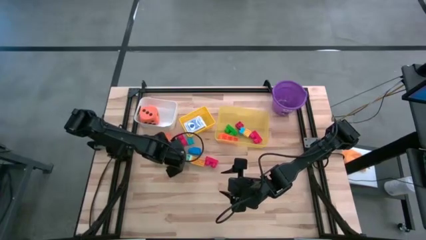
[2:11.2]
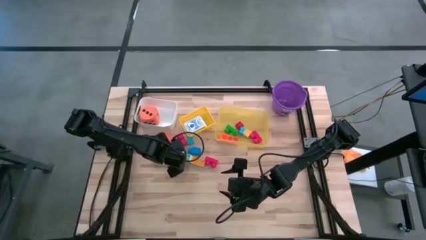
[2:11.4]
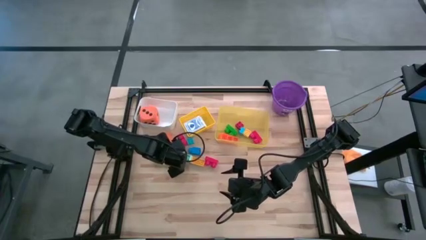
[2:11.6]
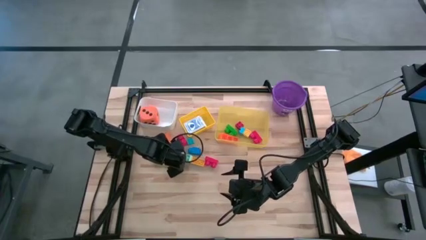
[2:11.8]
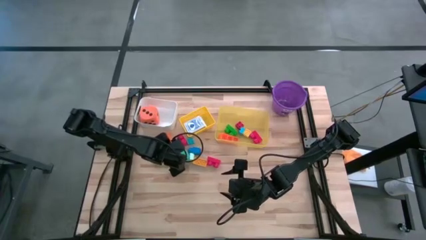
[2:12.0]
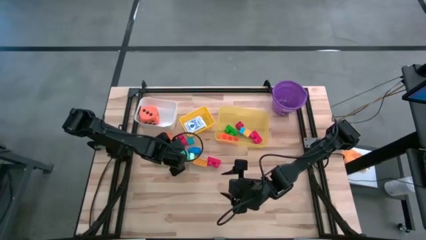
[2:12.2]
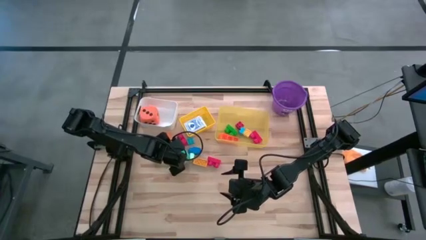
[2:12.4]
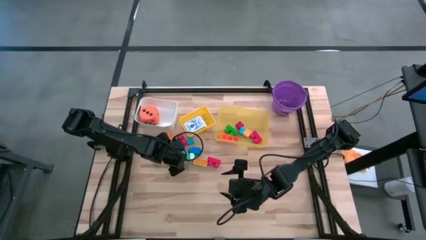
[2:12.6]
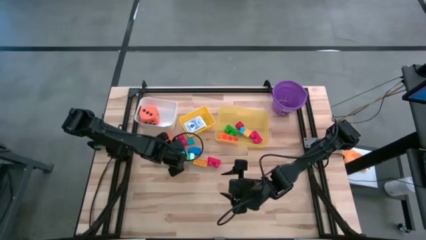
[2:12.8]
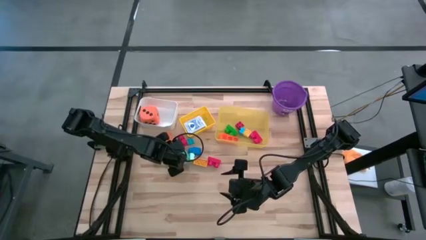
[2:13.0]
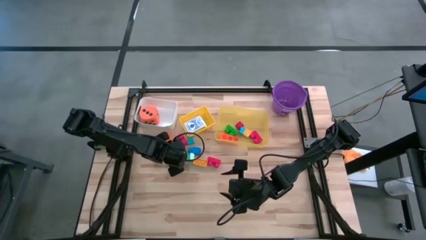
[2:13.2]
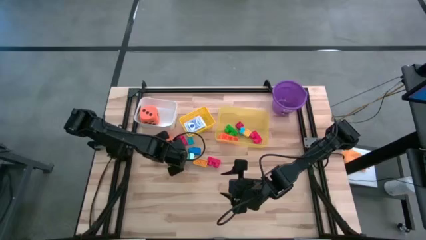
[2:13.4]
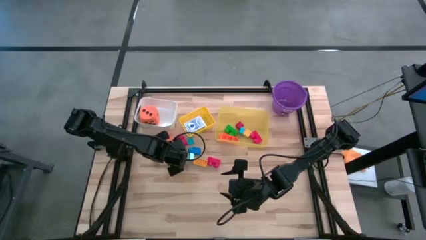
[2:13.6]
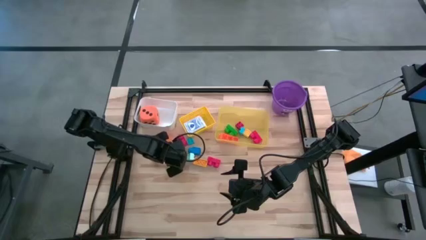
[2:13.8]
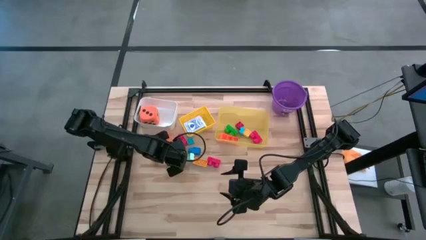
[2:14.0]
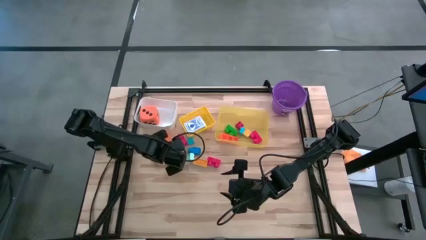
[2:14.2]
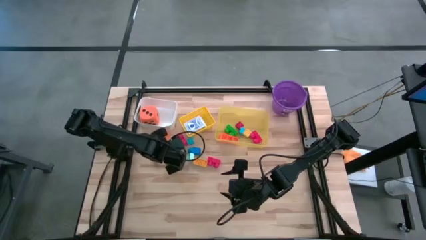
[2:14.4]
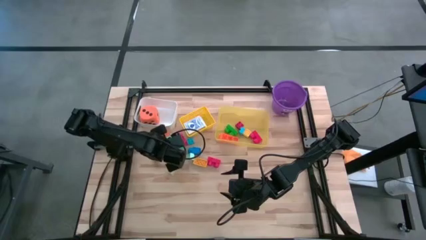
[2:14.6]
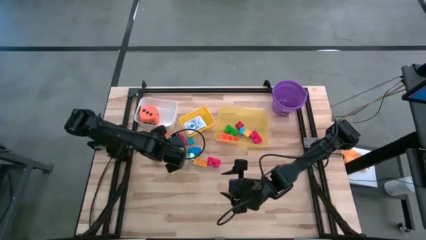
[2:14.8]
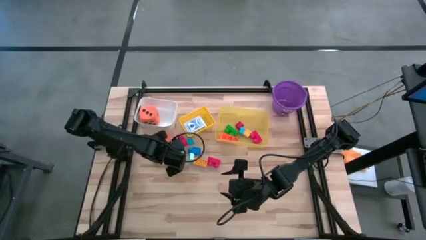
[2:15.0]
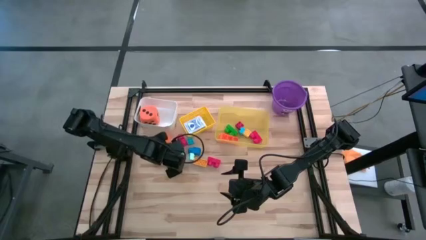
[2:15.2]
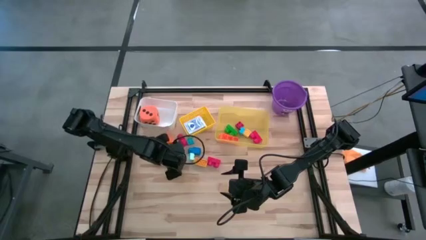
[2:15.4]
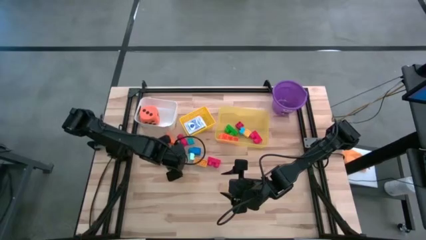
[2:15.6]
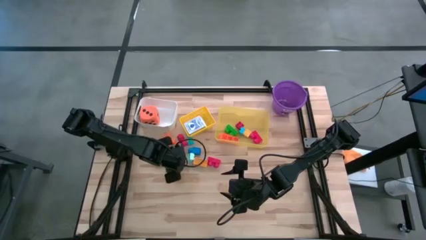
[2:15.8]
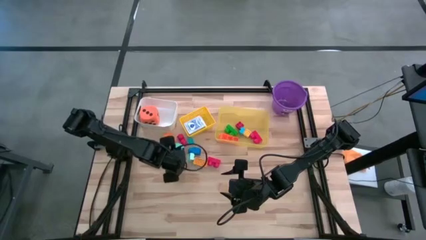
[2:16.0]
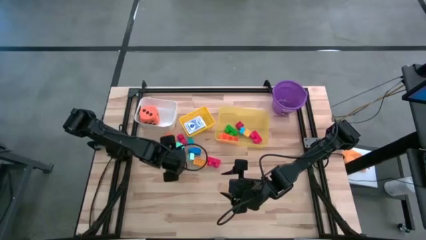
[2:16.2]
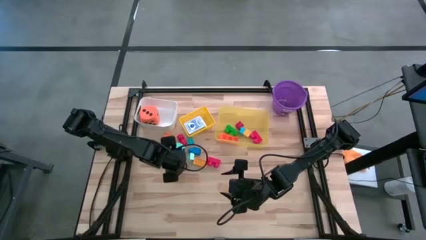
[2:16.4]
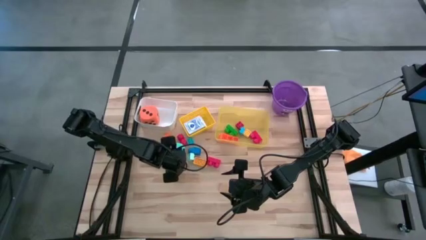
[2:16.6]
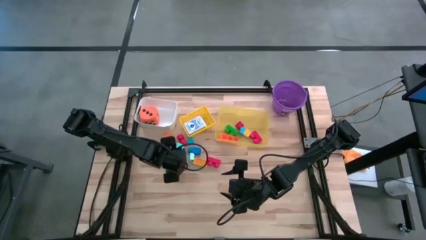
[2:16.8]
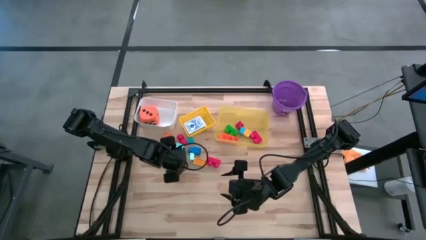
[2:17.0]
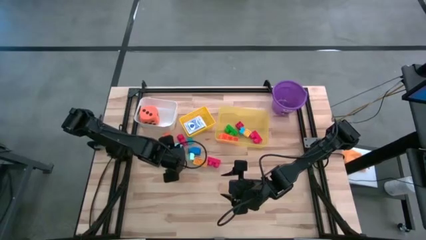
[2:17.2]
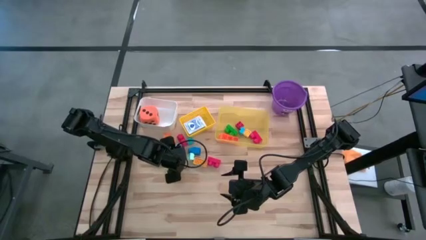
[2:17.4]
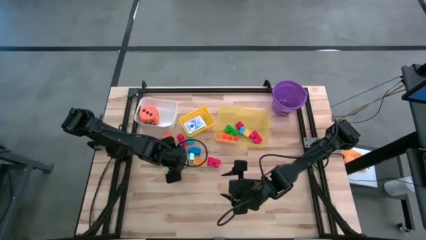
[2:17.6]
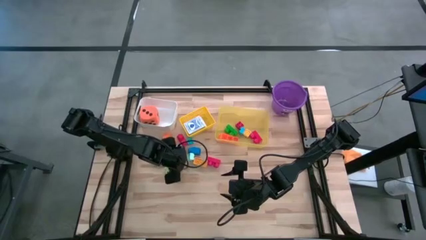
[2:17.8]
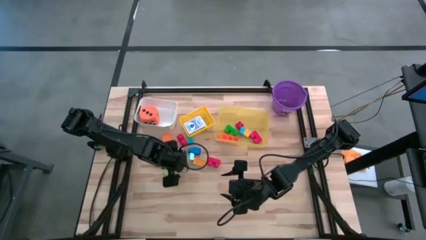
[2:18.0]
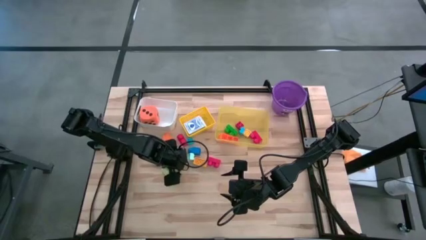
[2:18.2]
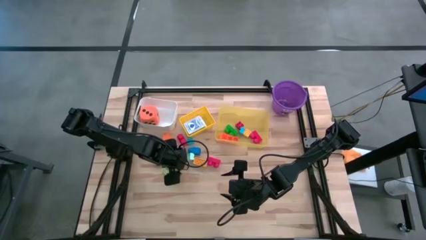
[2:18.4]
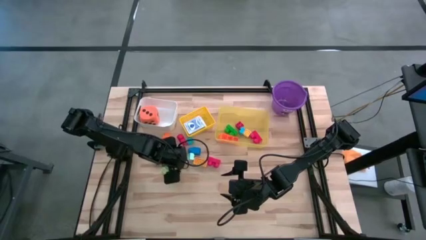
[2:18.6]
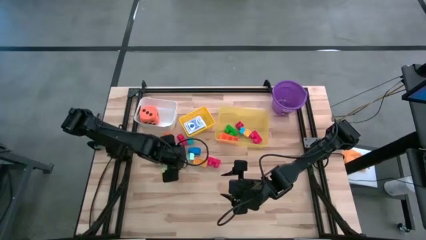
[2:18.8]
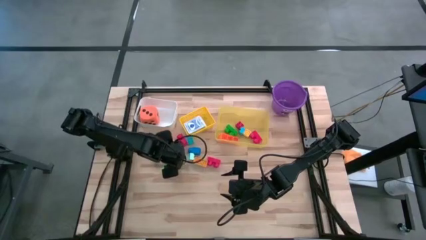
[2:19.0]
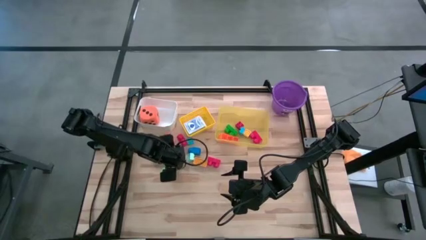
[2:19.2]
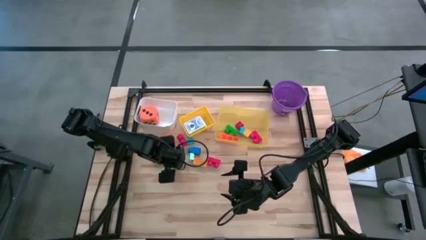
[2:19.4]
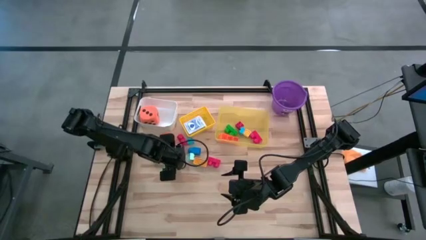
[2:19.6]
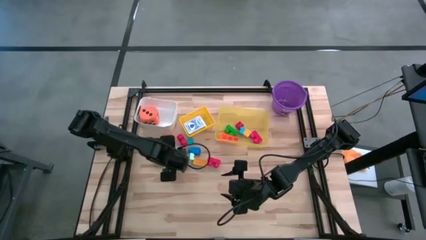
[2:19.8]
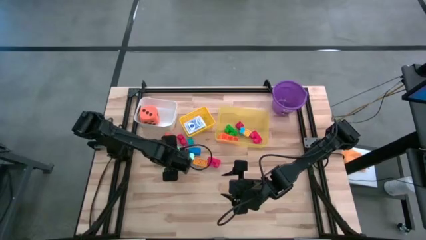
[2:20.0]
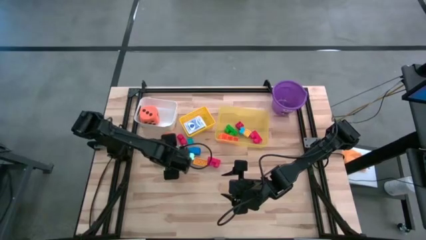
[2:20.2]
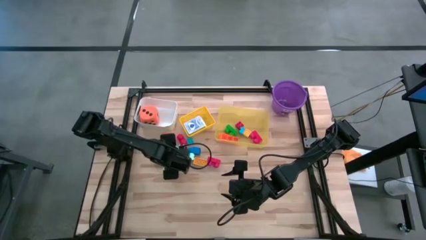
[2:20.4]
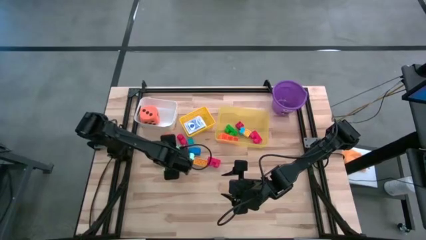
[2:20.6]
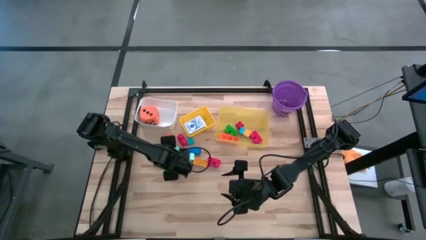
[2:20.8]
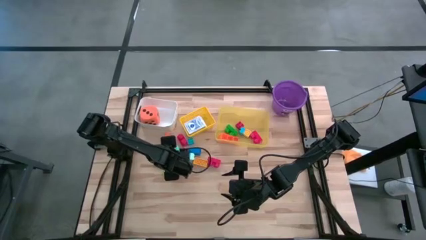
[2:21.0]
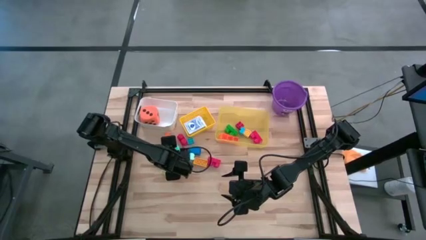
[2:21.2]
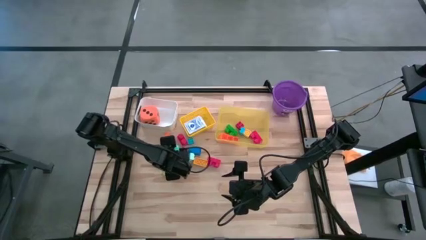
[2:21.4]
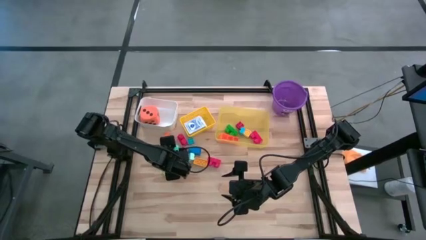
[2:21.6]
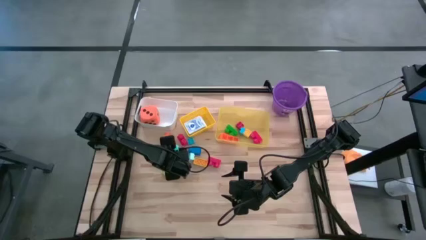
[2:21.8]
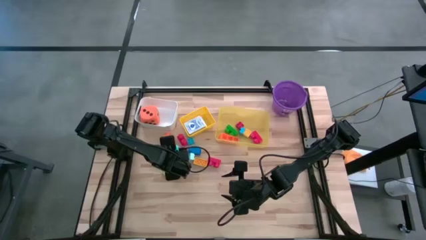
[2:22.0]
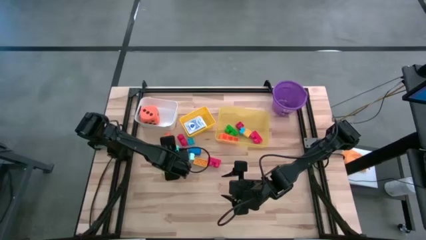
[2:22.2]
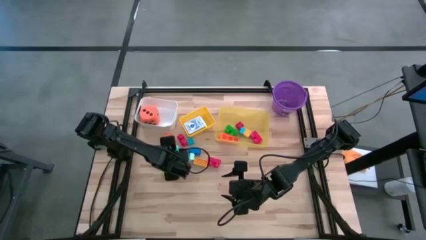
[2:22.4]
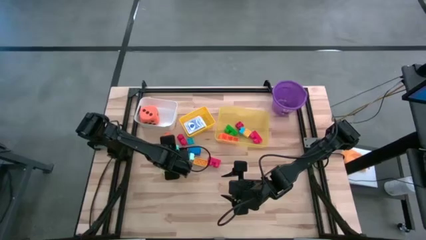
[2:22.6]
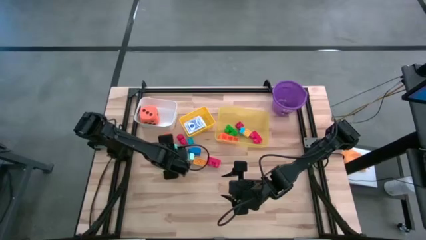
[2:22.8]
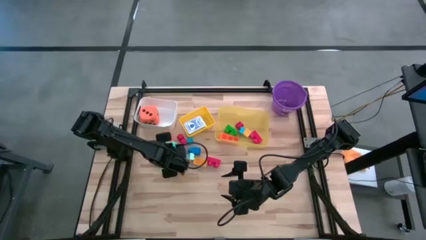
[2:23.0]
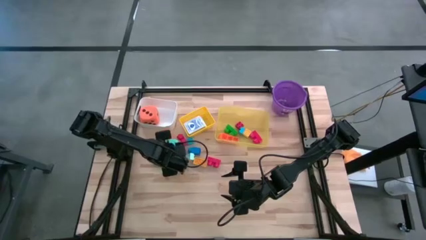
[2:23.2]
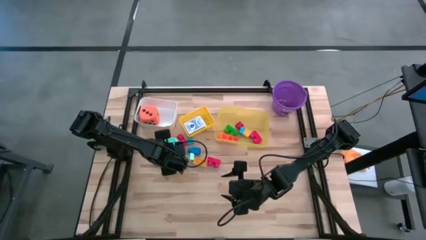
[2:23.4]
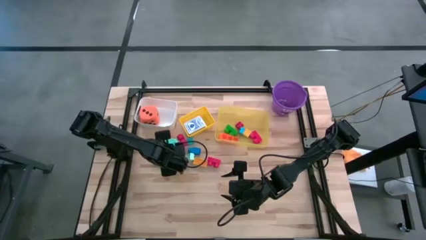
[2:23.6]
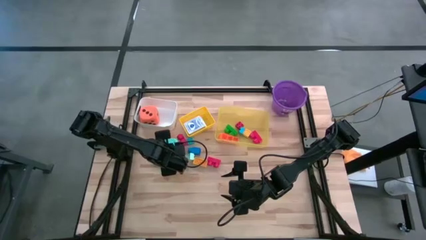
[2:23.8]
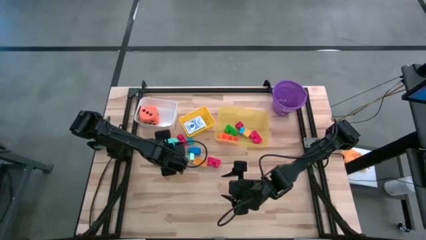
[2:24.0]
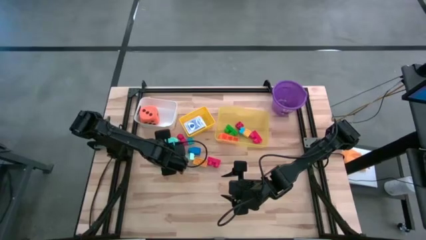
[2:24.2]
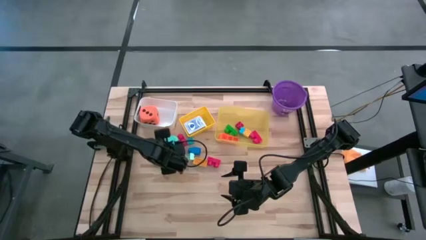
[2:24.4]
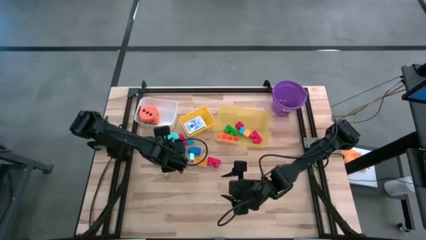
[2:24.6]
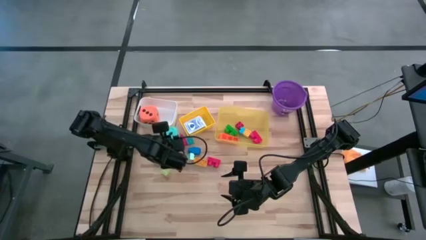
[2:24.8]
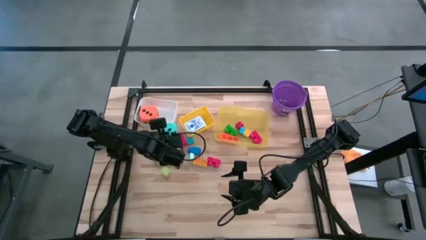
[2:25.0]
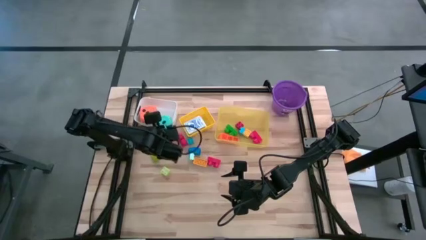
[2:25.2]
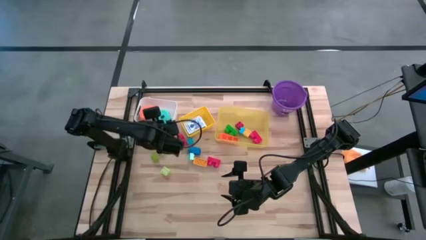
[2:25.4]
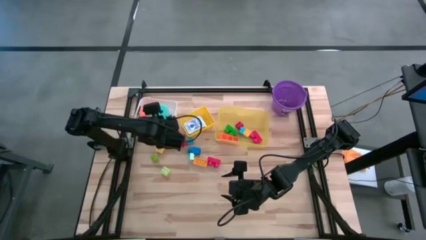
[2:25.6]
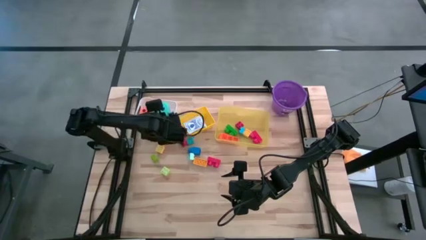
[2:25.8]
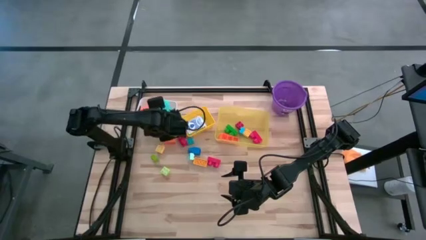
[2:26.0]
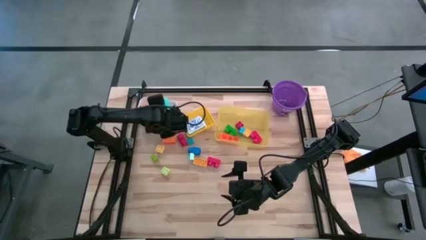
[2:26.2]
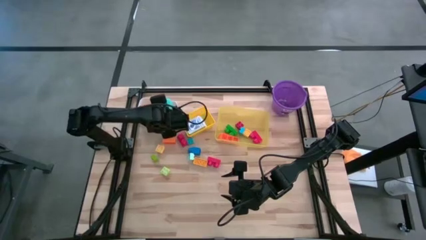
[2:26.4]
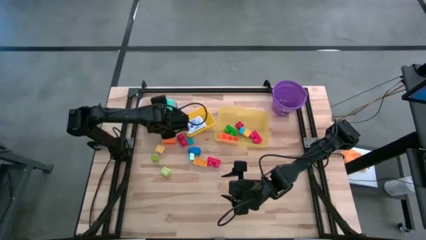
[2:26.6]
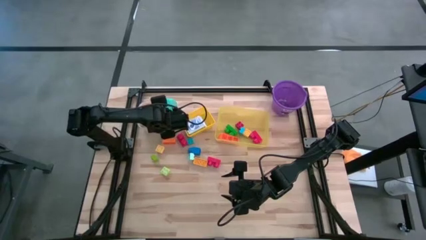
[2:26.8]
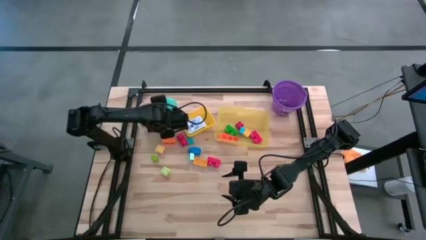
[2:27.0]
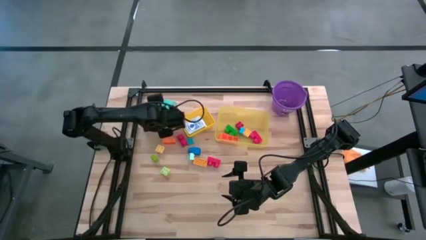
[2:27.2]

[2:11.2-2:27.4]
Task: Pick & Place Toys
Put the blue dice into the white bin

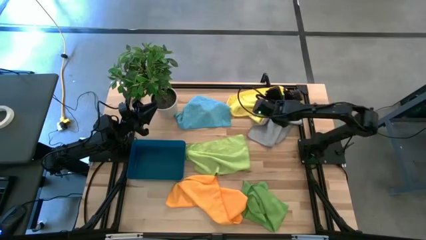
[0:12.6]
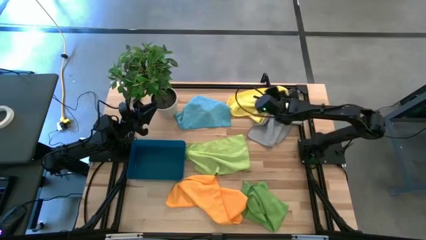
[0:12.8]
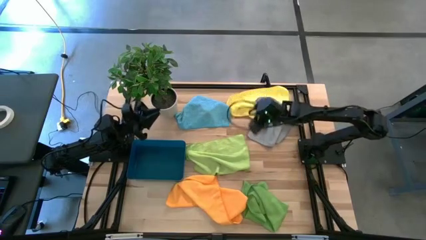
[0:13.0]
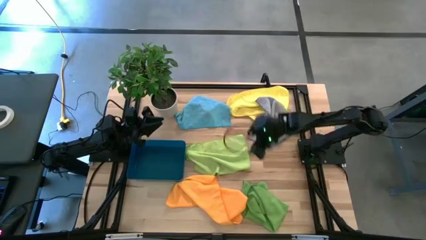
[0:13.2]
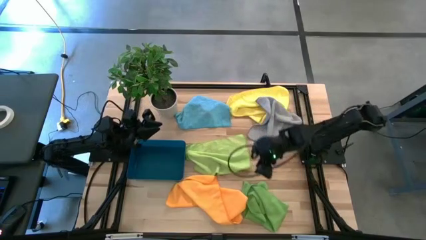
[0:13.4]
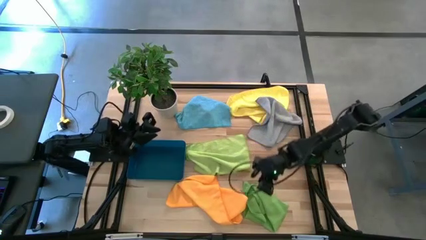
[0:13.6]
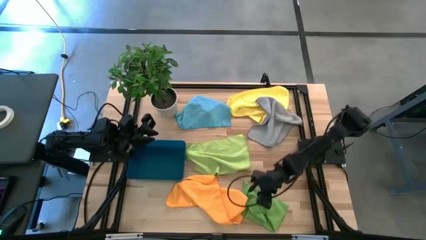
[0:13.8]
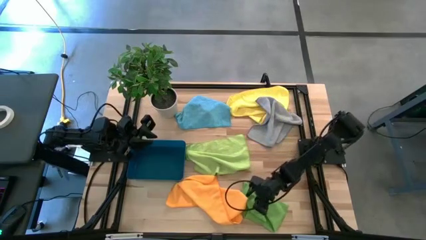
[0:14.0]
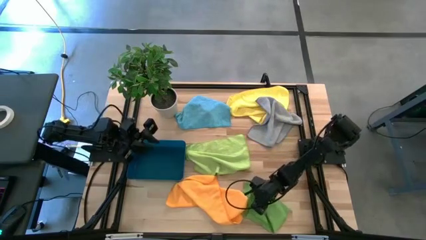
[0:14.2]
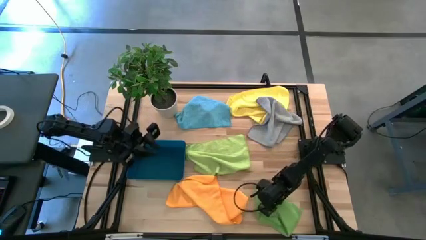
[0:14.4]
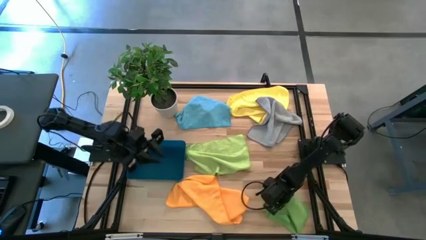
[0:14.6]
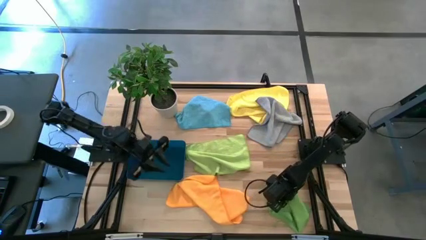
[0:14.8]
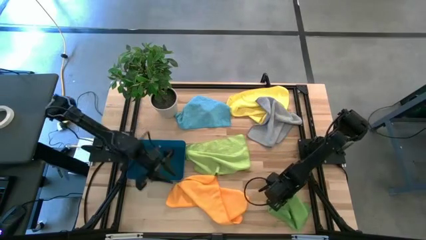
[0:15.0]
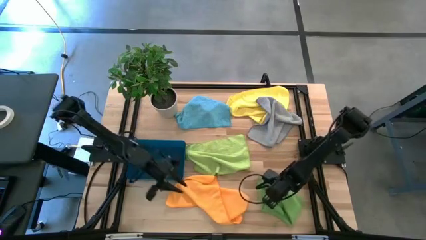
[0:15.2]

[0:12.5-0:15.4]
Task: Fold microfiber towels
Move the green microfiber towel to the bottom right of the table
